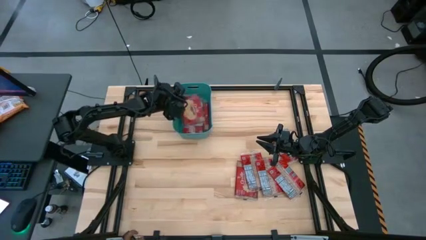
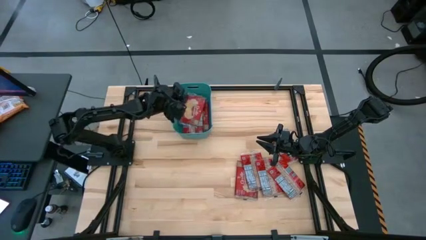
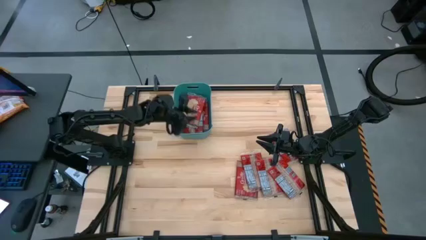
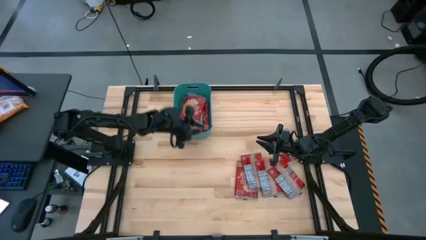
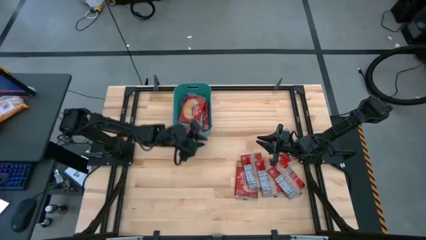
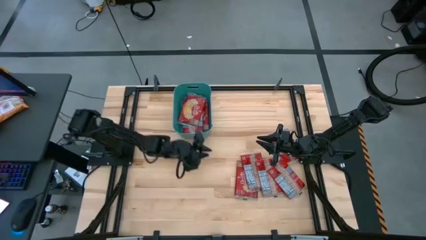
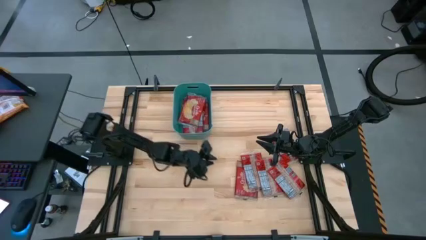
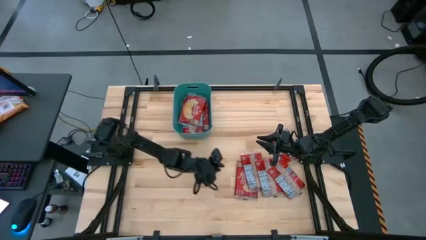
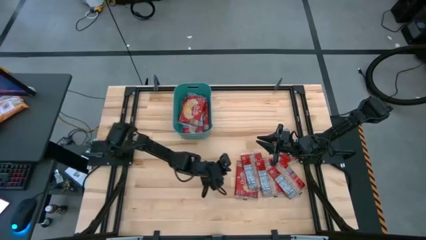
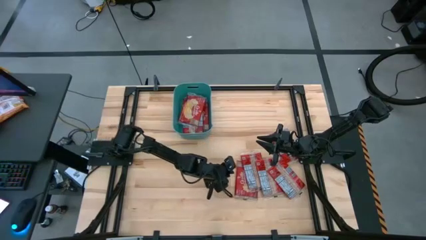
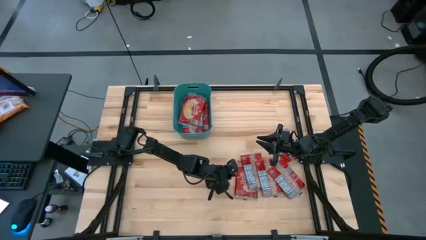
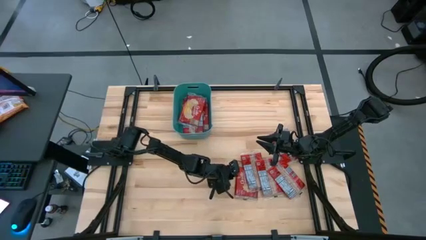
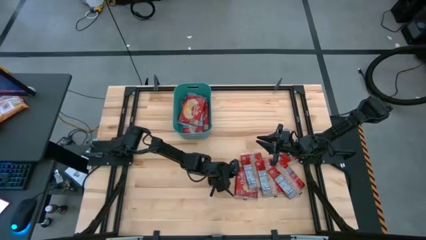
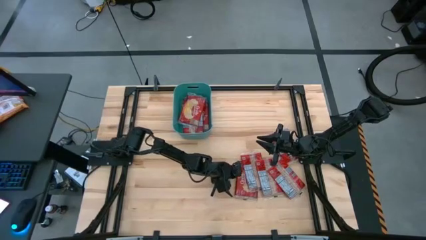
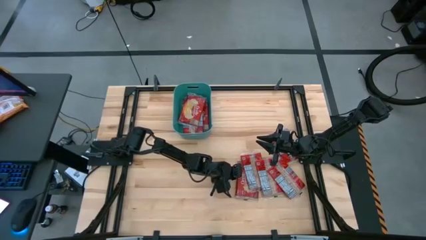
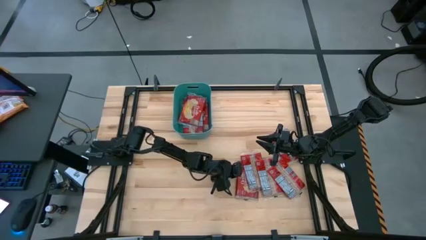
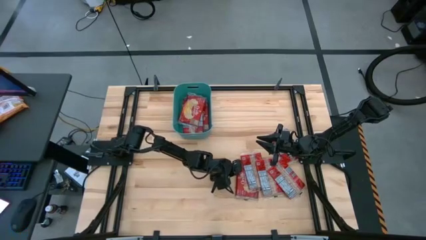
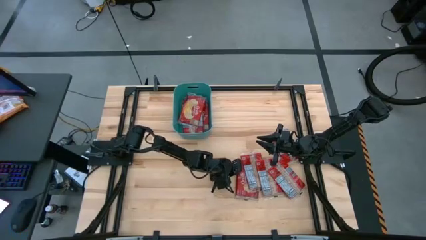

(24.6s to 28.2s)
Task: Sort popcorn bags into baskets
Put the red popcorn bag into the green bin

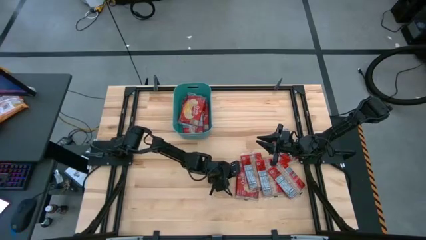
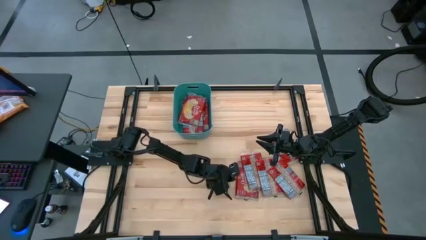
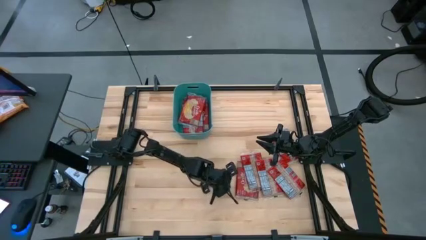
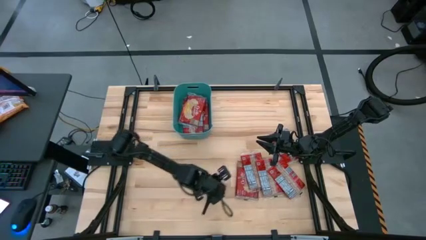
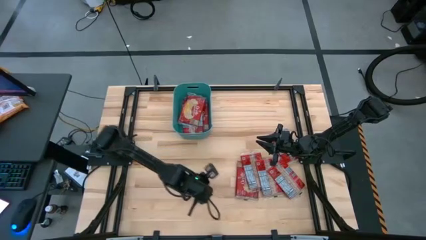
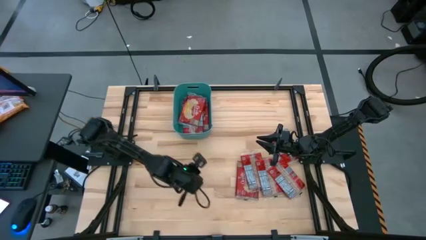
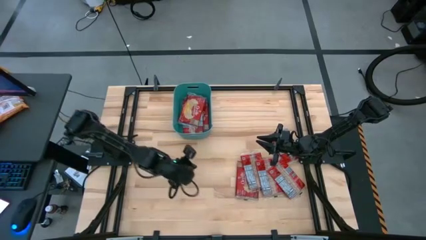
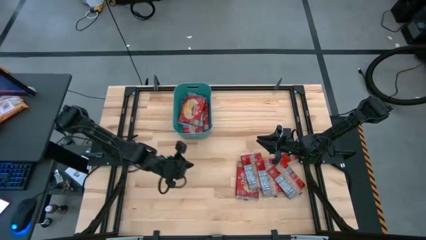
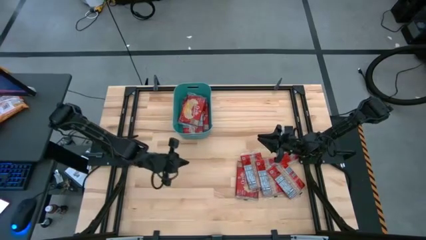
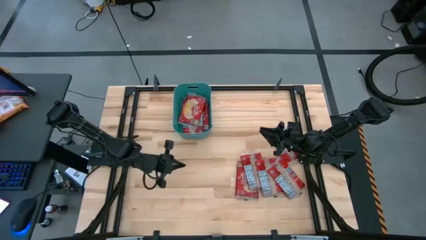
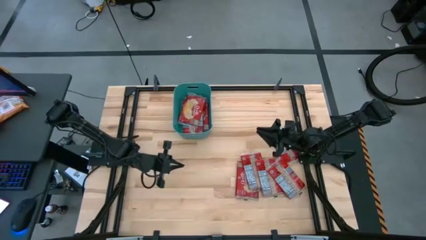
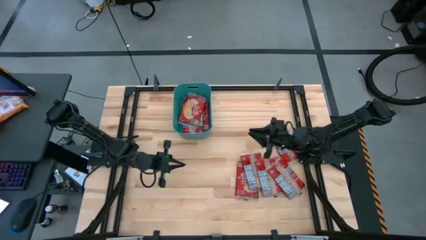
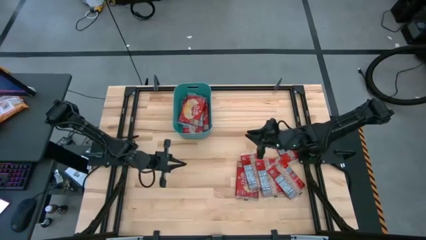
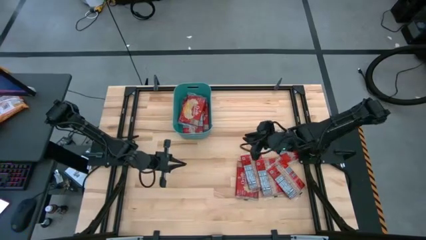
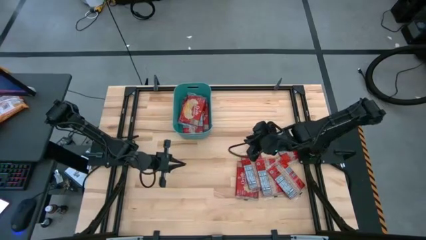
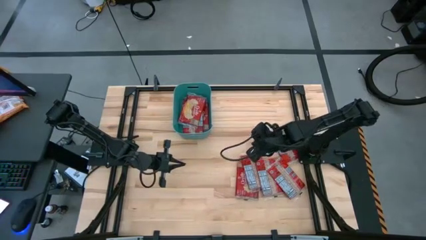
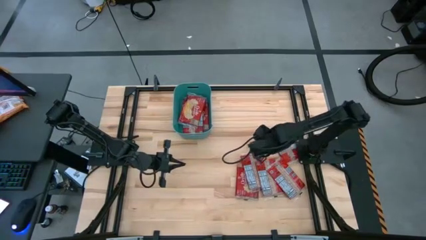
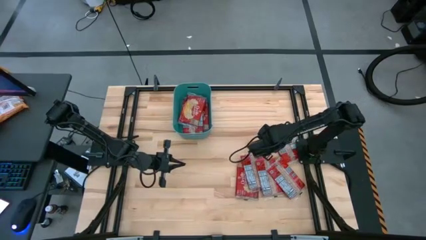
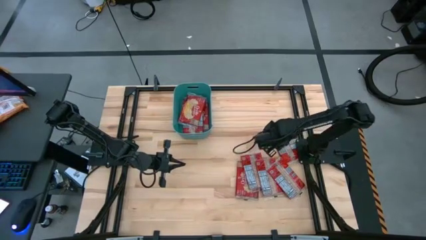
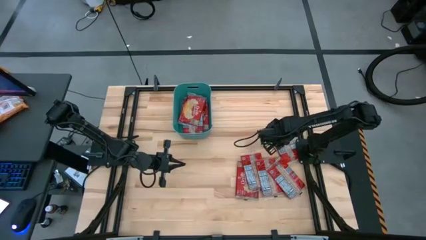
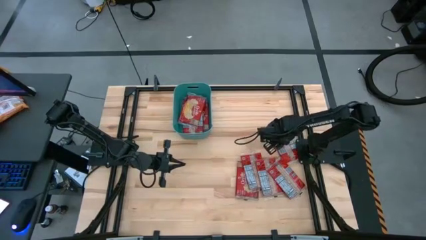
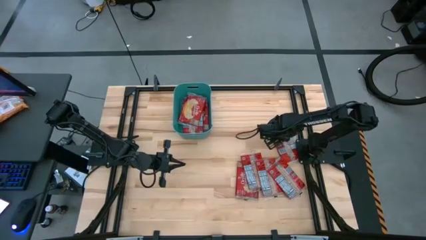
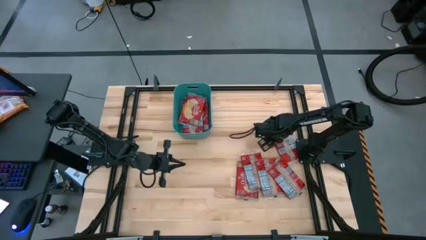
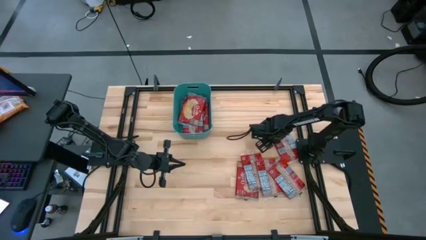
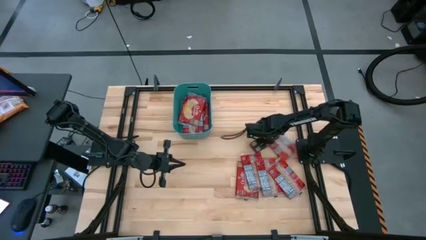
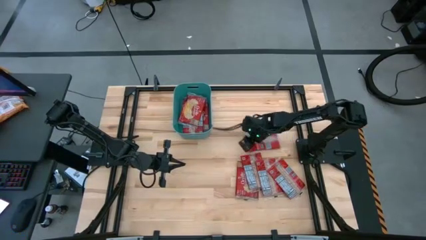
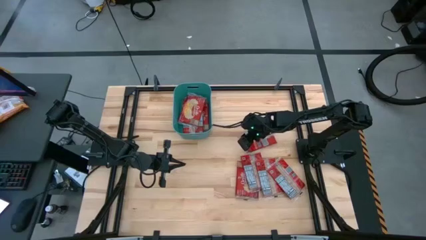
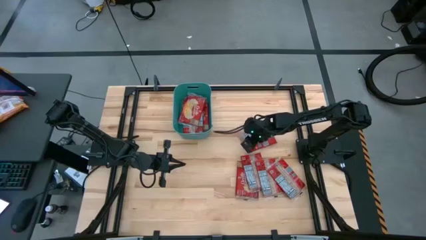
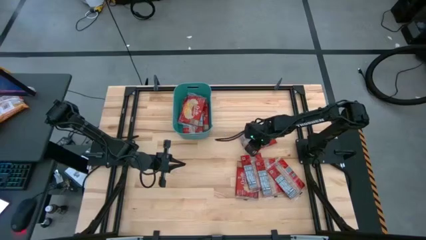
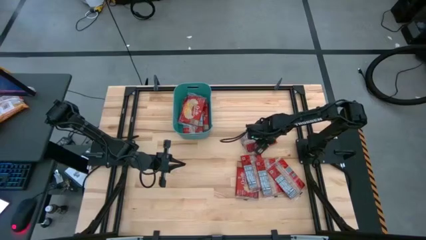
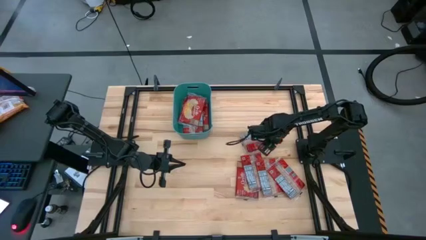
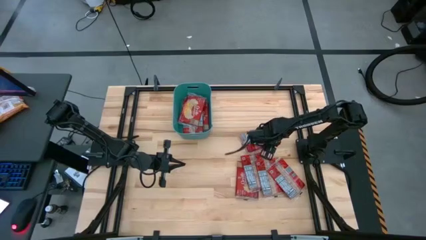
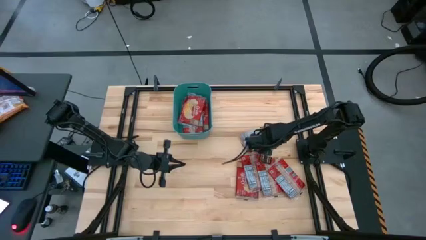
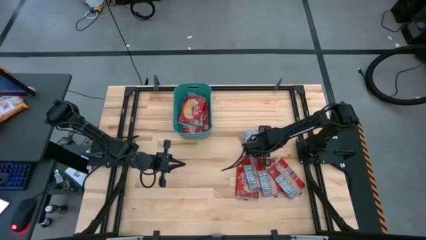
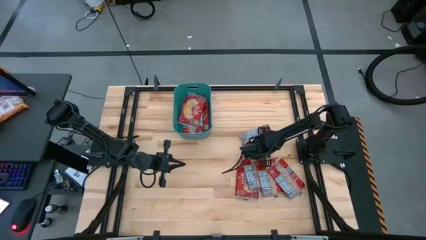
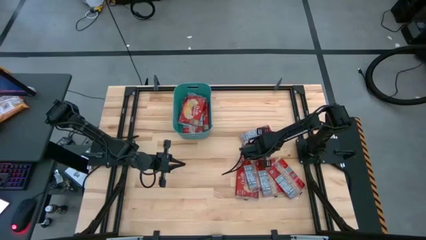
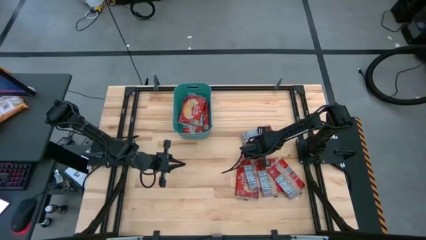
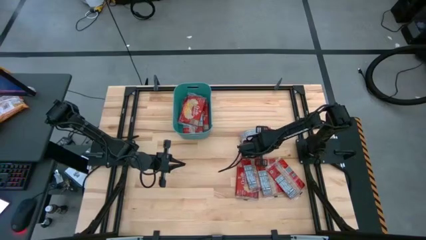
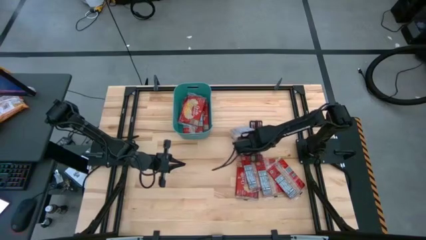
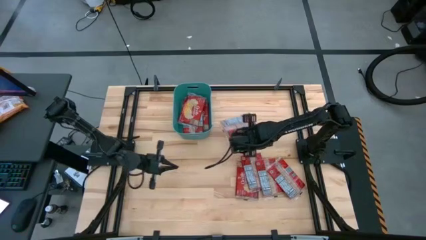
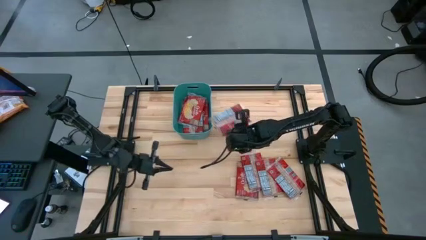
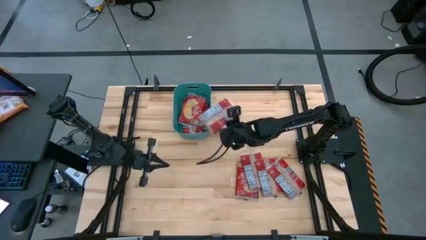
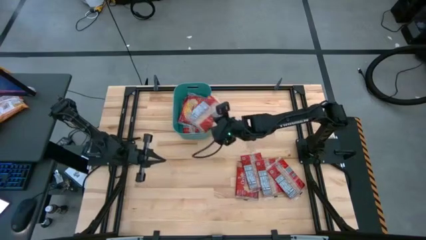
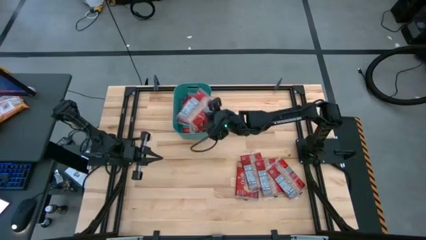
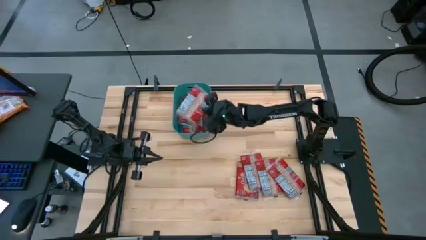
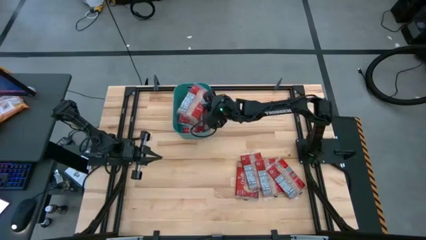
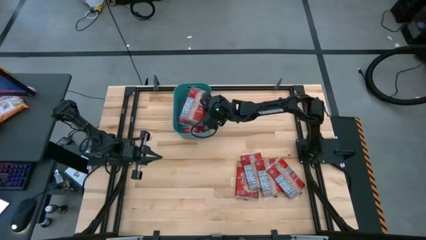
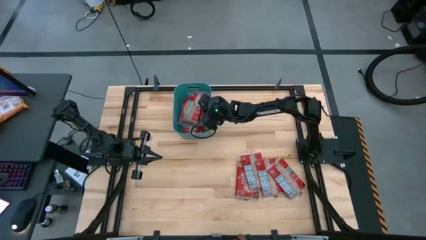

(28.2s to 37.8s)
Put the popcorn pack into the green bin

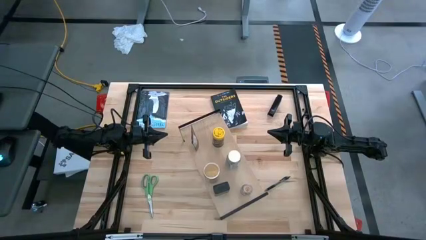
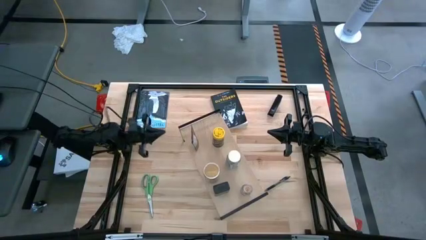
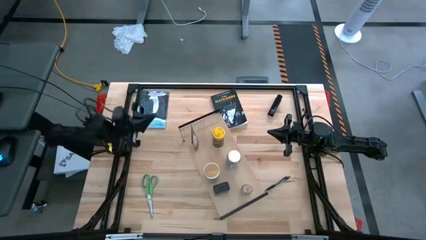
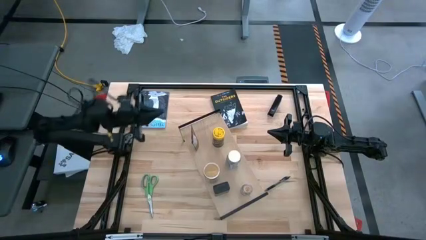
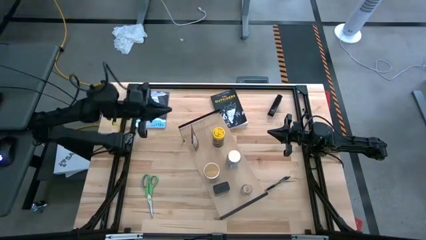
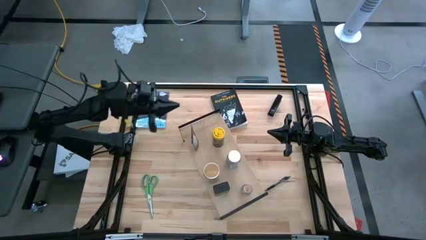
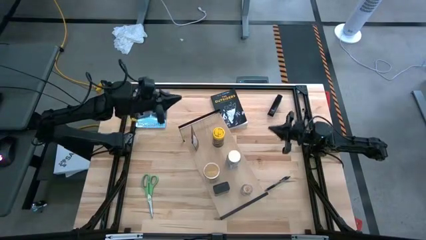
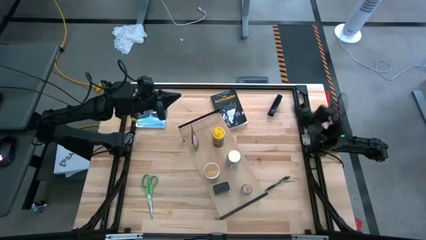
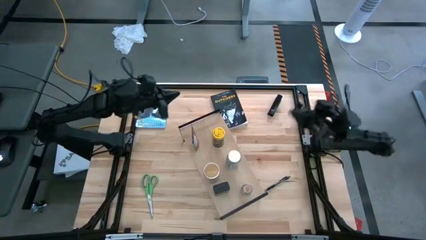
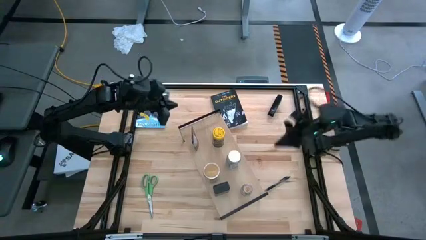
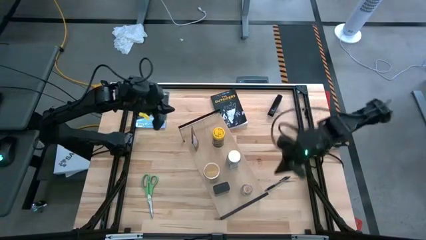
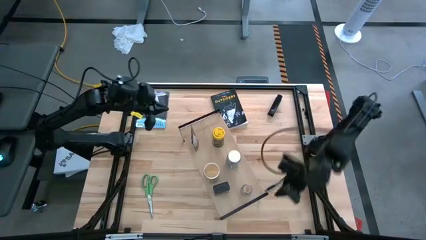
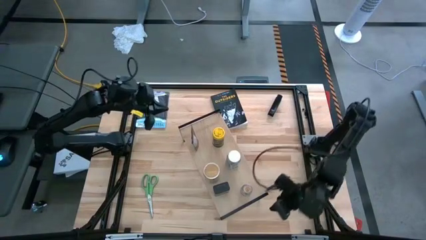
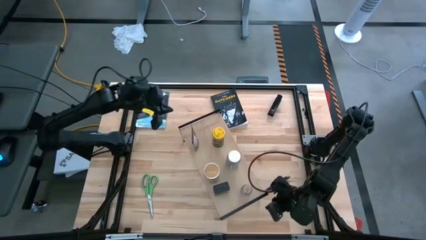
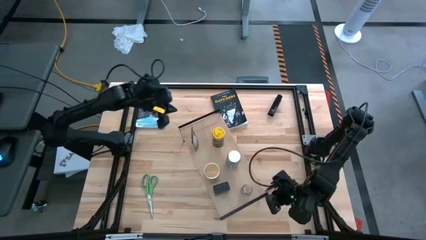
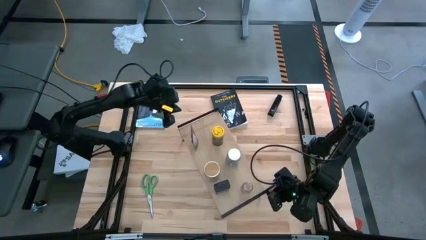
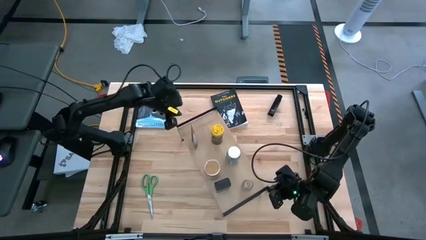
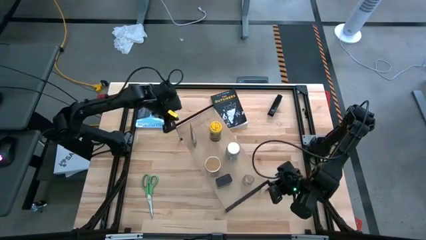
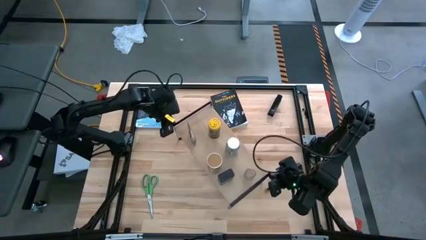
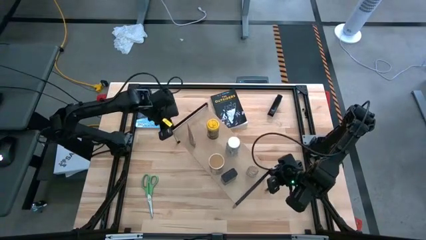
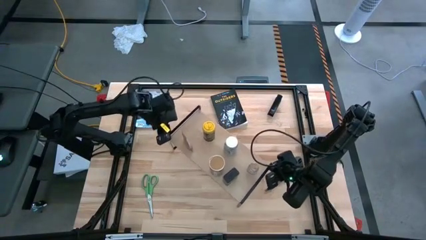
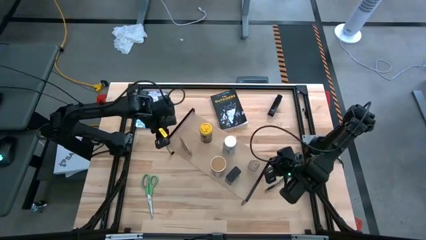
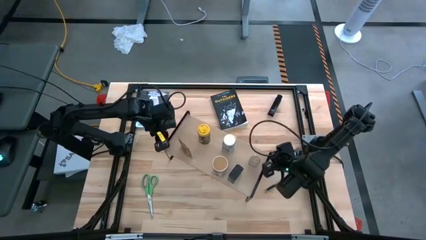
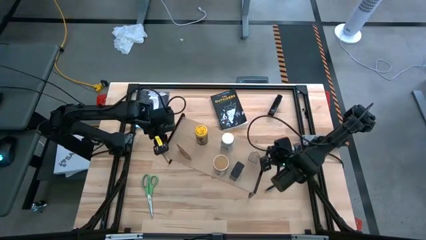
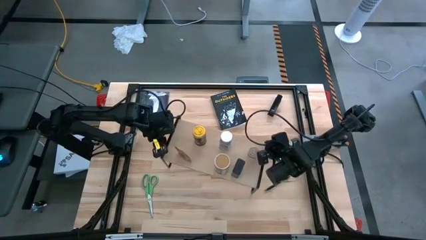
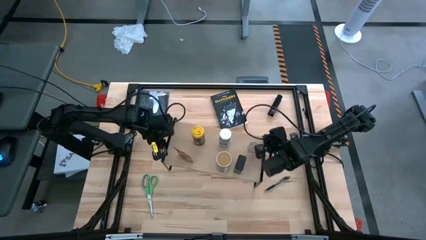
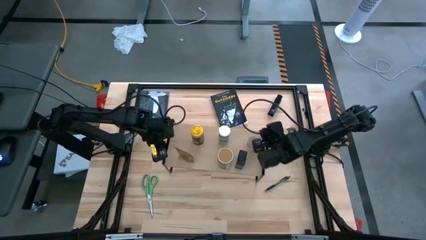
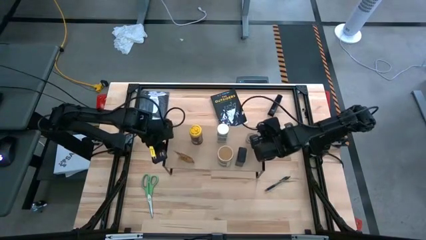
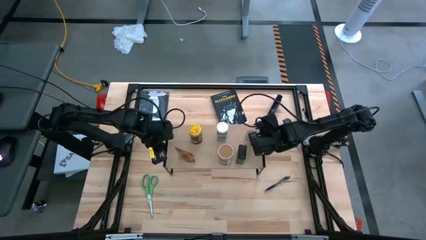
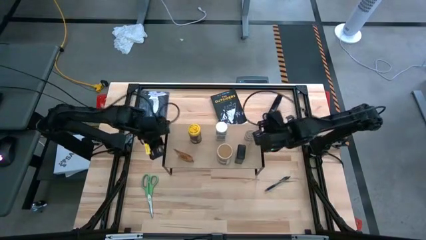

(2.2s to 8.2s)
Task: Shelf spices
Adjust the shelf
